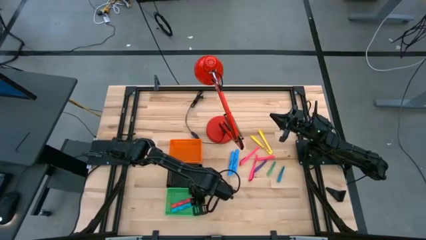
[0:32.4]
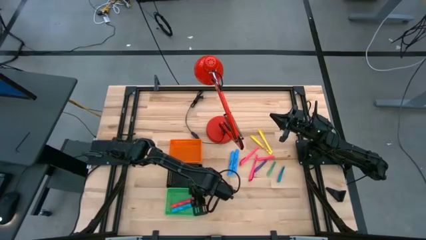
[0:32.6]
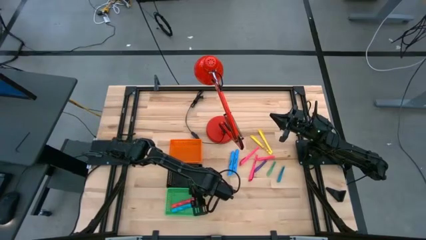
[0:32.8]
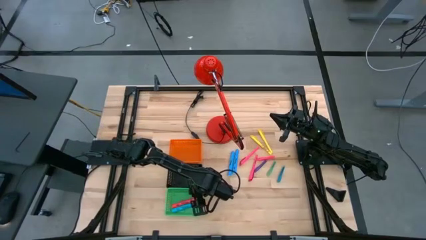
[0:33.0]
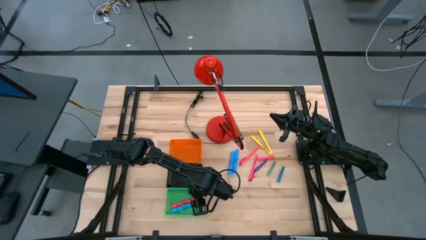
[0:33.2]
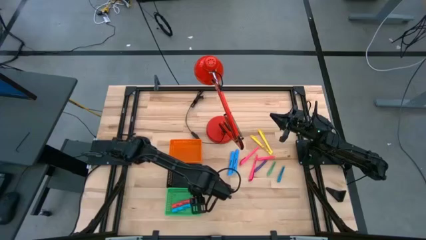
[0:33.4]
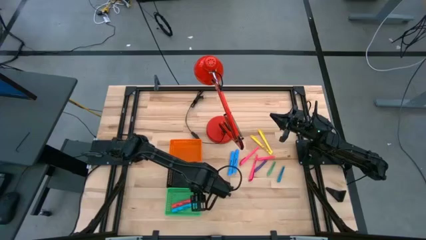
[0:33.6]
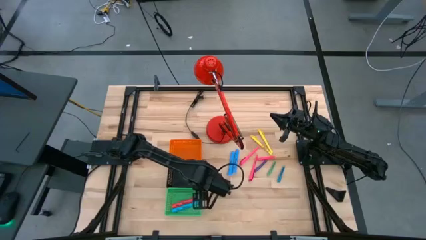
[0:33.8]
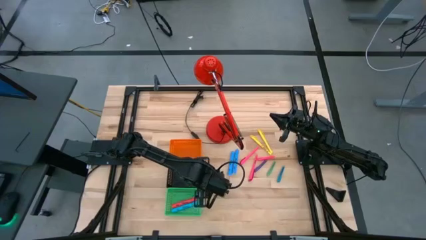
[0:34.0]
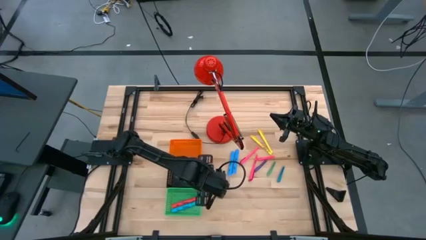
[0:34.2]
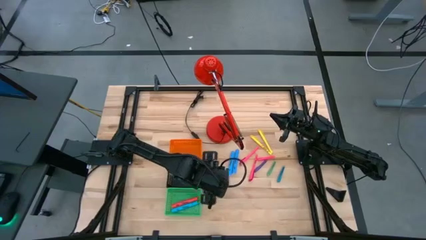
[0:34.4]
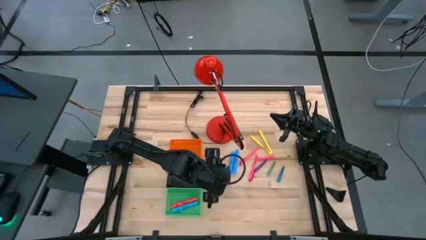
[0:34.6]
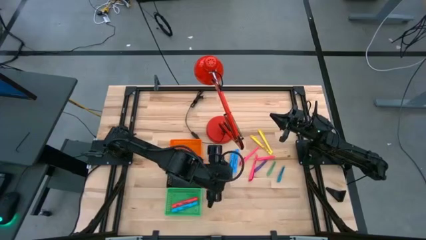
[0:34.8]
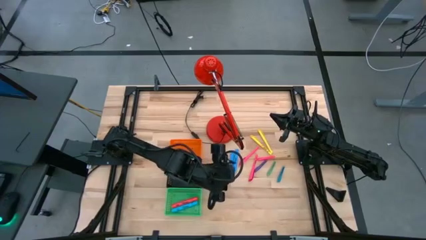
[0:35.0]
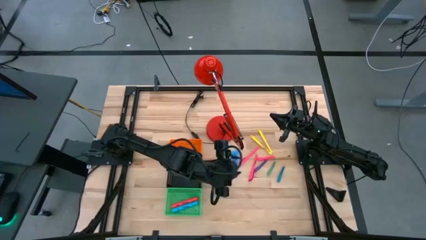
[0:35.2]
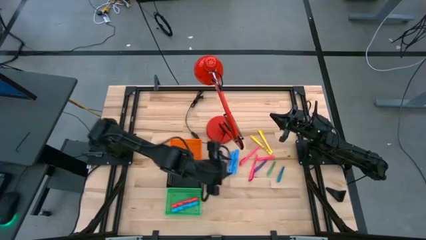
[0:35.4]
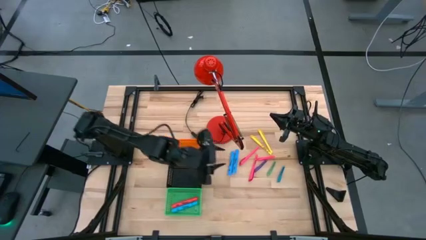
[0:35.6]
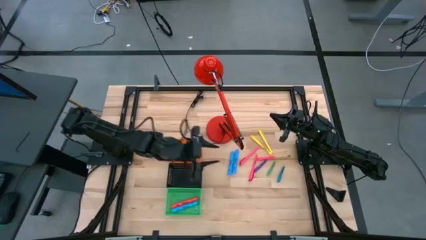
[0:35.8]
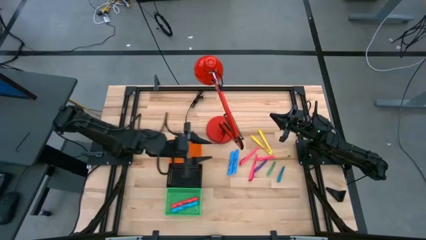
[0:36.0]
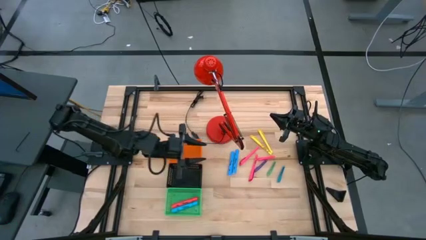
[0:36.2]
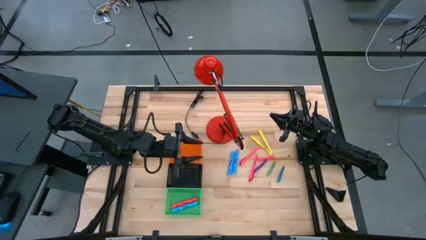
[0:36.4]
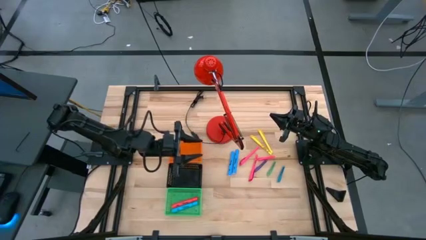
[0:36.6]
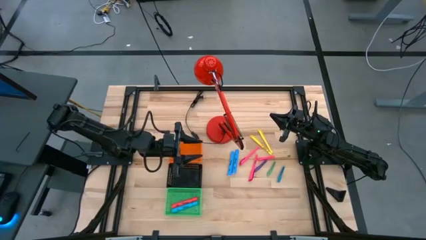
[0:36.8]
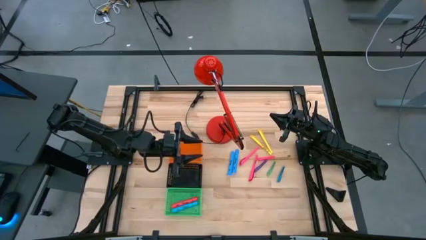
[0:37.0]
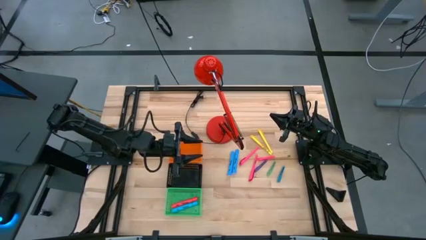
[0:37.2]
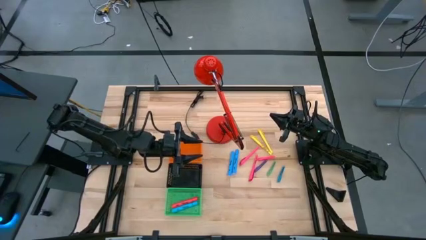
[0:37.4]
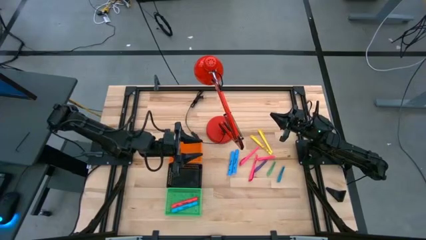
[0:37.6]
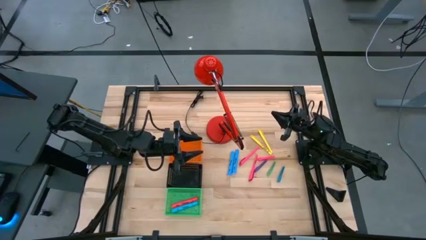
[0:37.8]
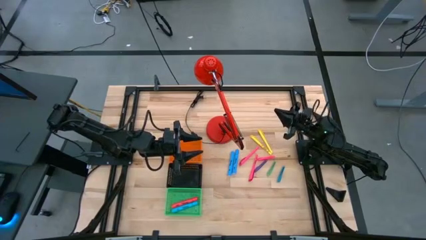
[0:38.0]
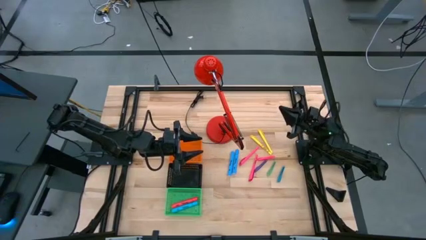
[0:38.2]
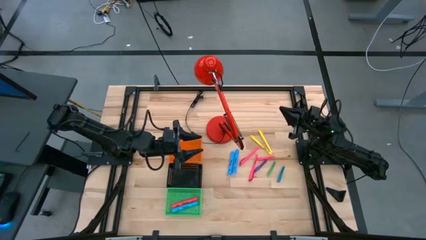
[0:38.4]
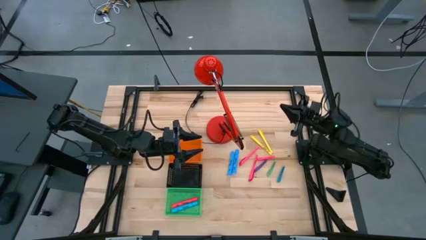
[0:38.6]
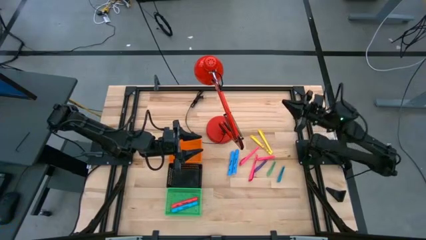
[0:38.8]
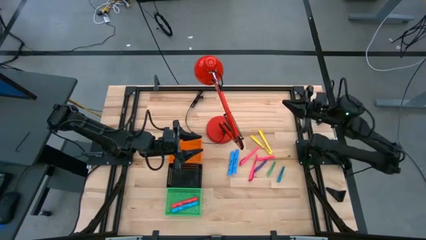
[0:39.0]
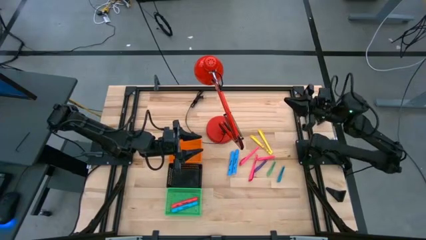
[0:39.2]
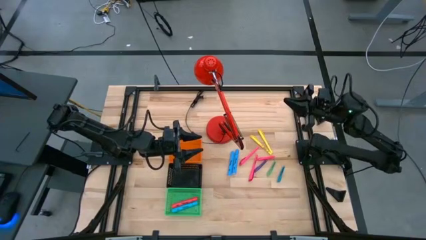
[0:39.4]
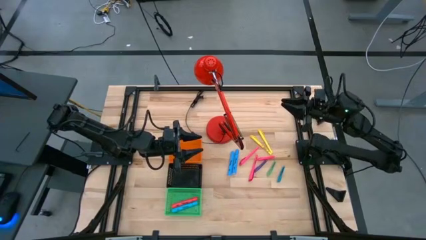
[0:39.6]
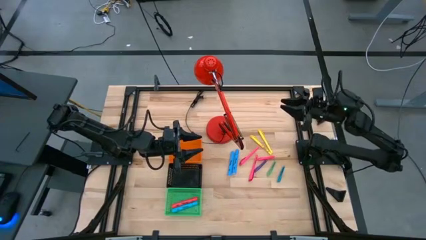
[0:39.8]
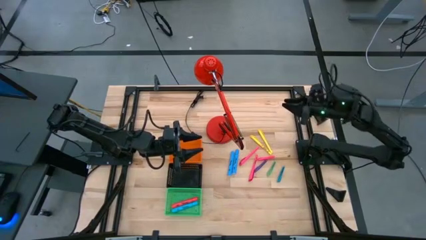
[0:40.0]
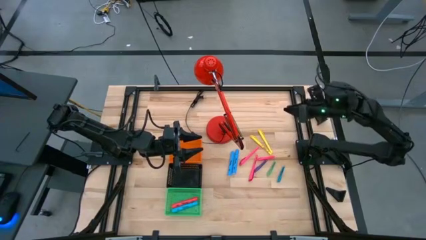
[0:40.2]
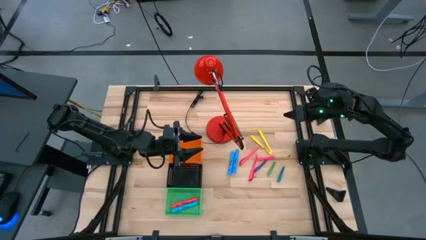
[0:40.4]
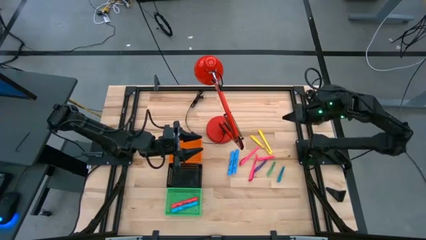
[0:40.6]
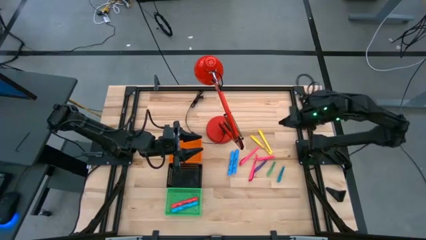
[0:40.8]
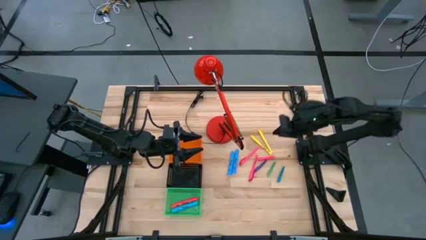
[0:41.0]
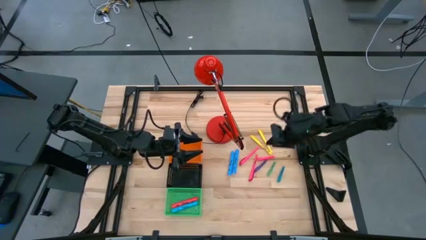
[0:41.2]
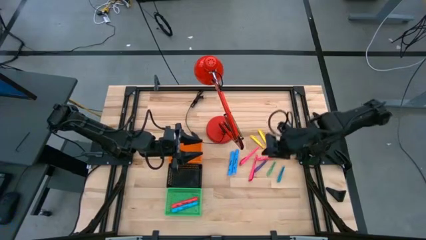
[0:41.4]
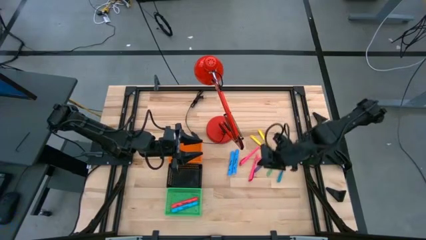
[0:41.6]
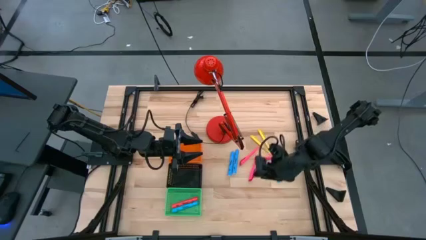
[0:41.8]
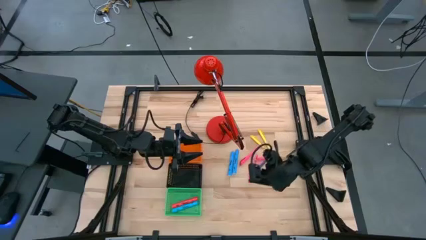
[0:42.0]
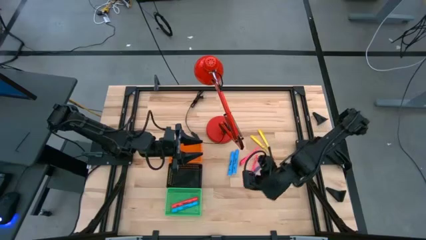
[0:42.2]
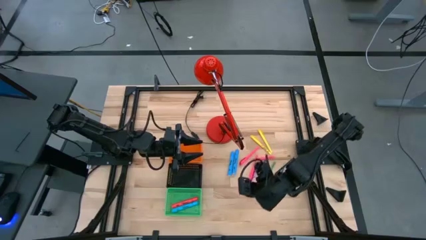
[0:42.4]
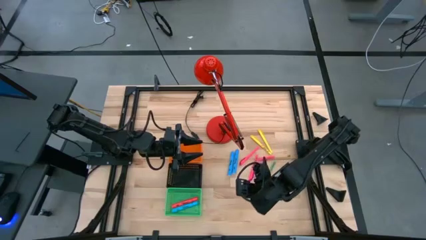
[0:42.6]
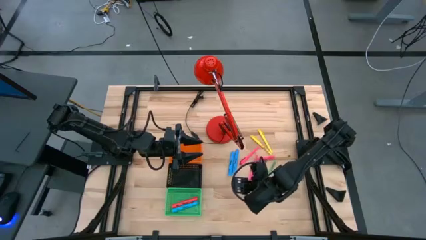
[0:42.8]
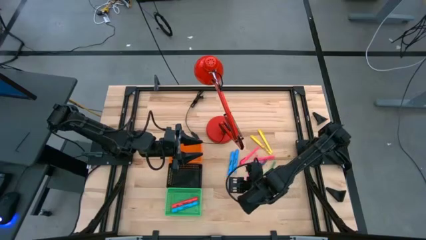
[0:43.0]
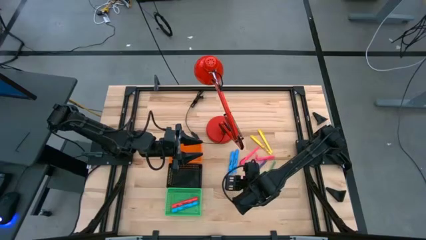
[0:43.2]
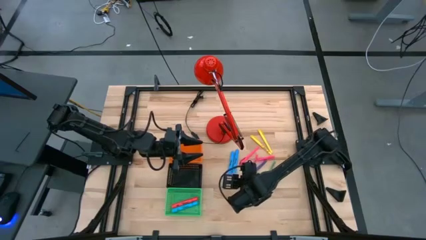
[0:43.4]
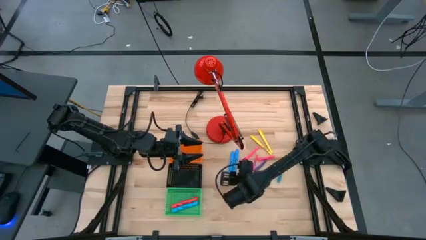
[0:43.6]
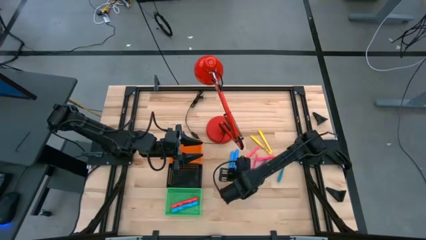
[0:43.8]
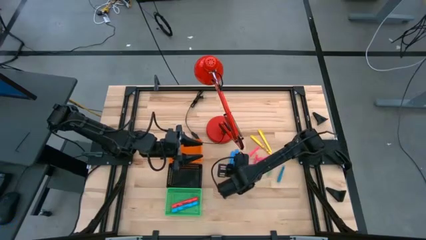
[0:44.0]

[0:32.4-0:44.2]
Task: Pick & Place Markers
Put the right blue highlighter into the green bin
